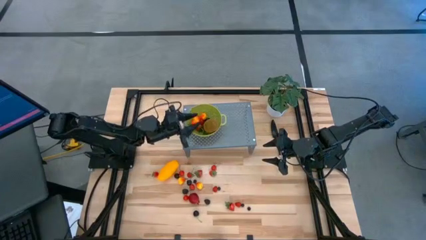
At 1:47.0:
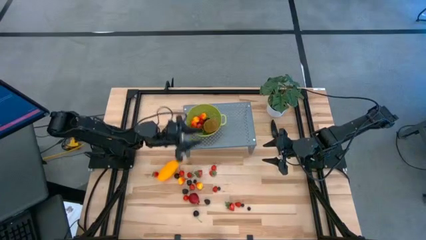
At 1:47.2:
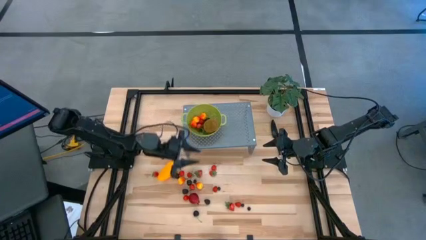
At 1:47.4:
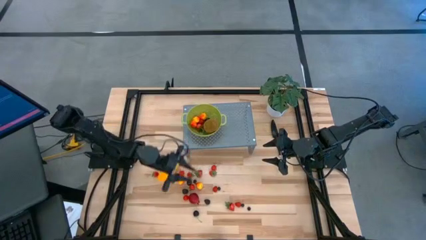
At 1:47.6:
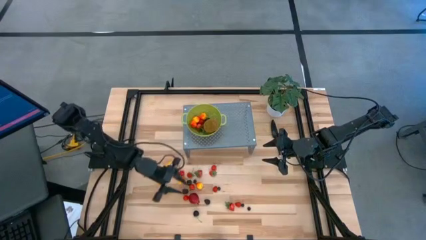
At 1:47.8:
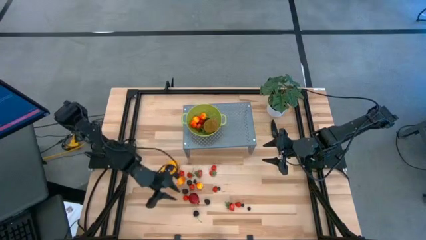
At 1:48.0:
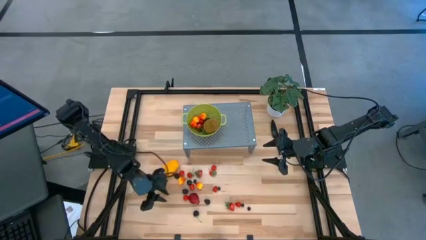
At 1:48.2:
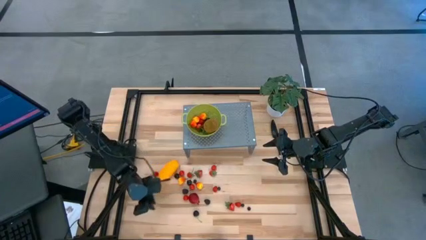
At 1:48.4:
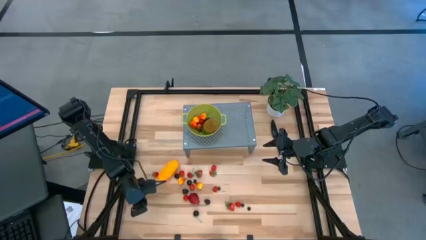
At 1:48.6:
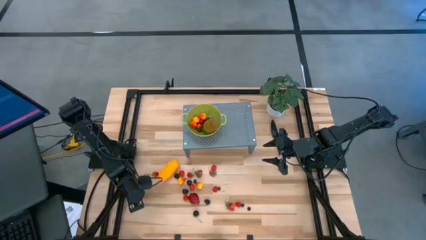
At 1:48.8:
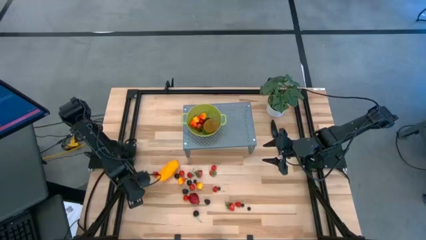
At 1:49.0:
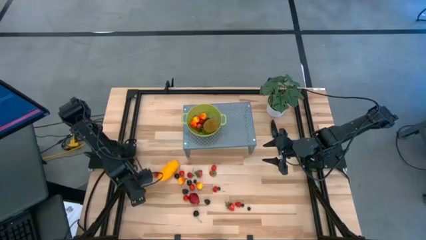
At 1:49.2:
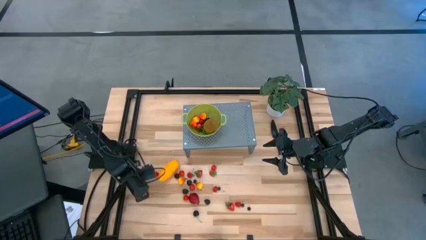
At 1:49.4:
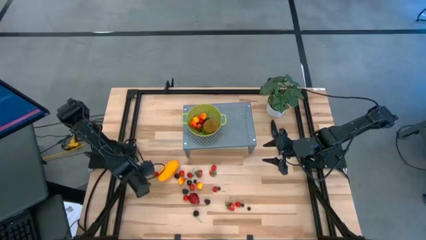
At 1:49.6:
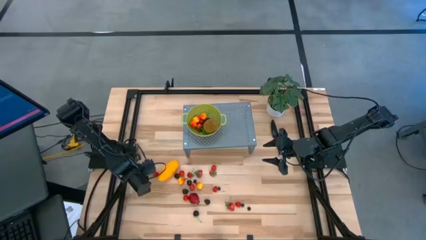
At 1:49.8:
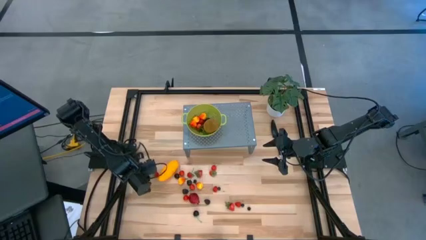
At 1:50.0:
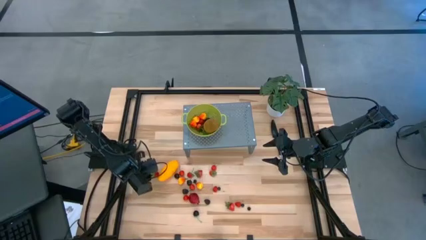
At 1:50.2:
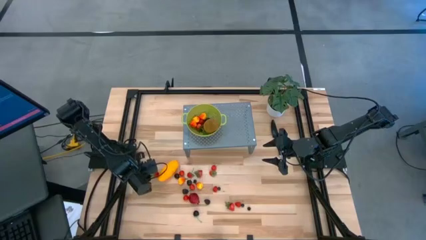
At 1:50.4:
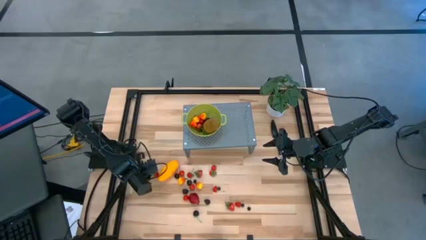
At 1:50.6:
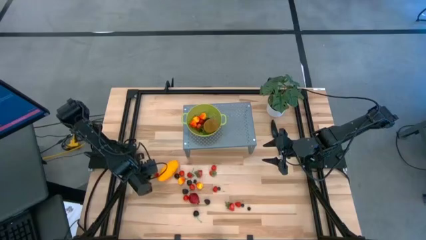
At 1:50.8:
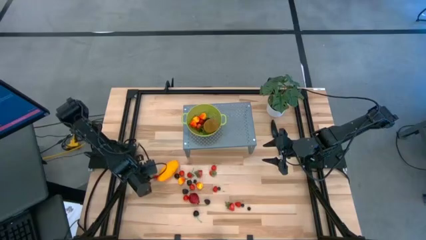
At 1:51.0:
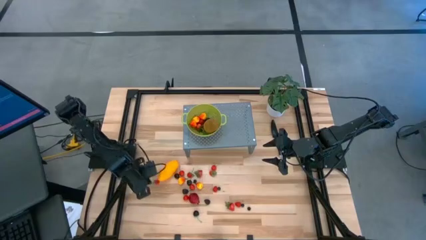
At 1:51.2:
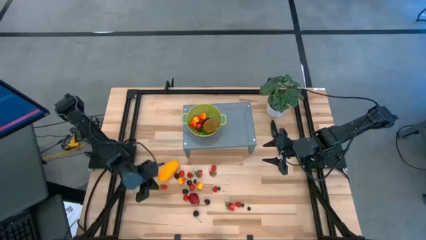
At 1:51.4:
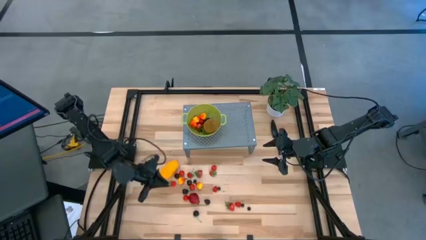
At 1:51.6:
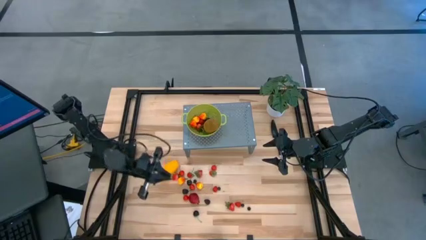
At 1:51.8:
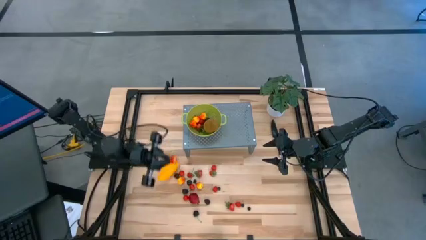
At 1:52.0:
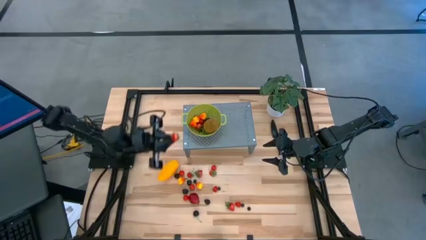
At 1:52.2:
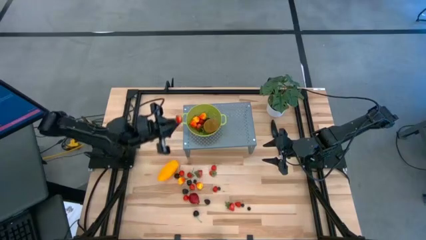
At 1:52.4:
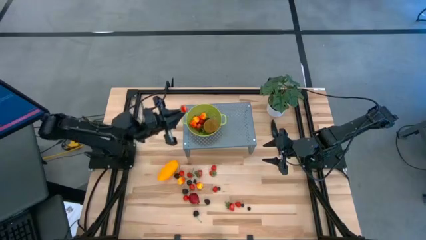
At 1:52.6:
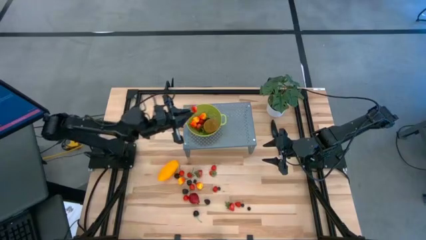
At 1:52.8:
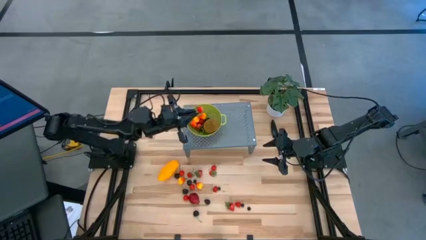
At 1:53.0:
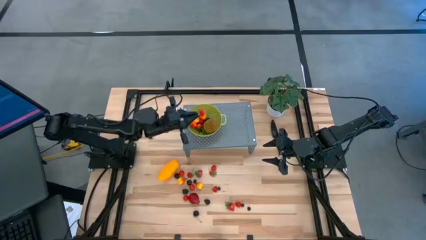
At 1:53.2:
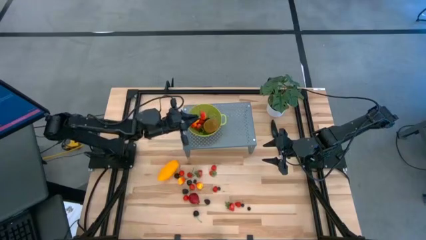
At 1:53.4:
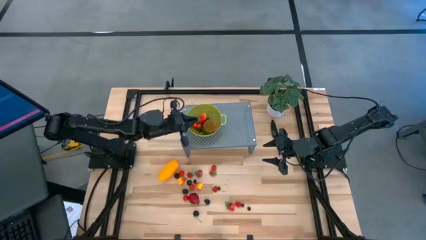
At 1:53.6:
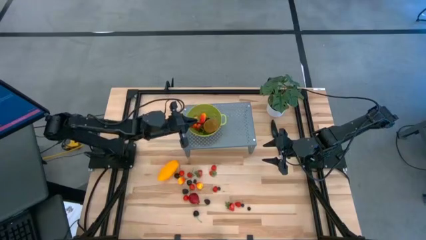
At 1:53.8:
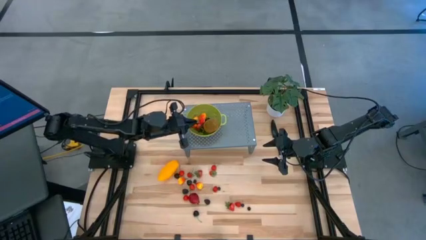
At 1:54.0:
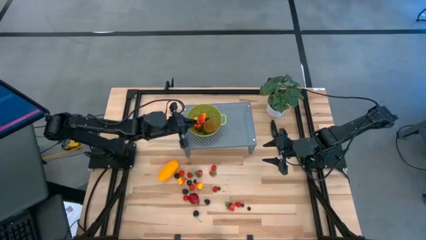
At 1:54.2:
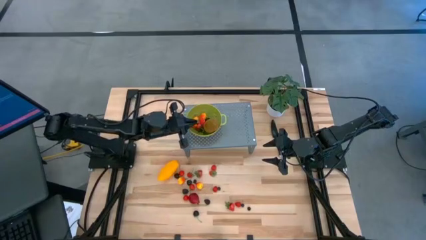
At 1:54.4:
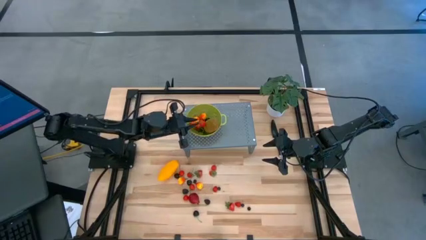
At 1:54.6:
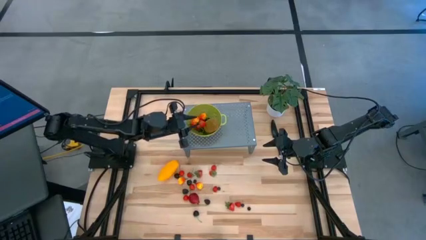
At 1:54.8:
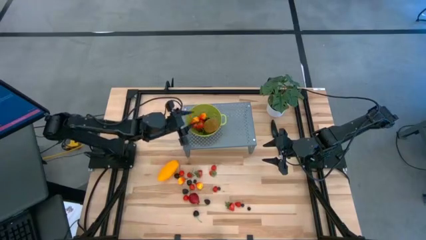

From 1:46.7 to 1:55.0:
Task: Pick & Place Fruit
Put the strawberry into the green strainer bowl on the shelf

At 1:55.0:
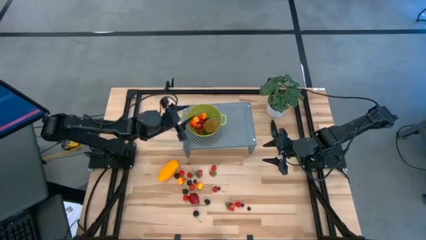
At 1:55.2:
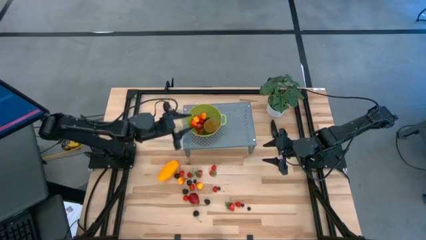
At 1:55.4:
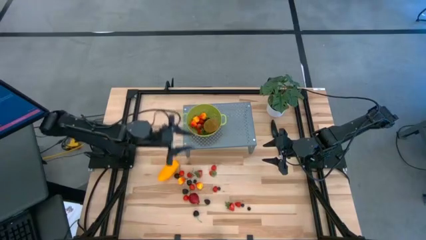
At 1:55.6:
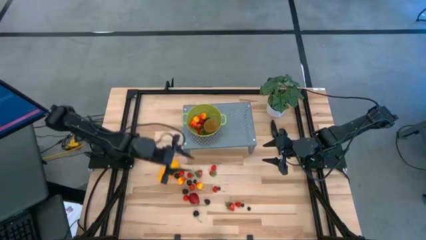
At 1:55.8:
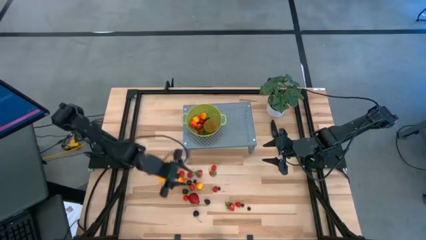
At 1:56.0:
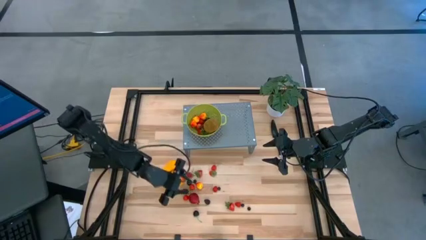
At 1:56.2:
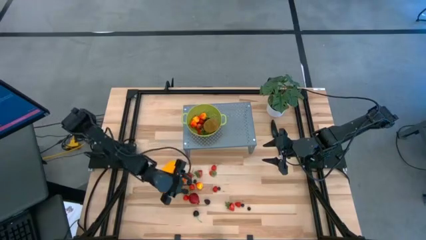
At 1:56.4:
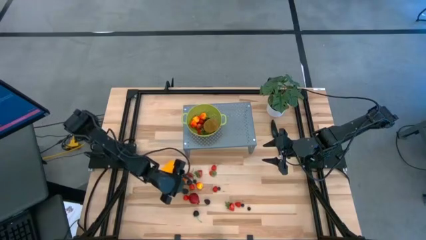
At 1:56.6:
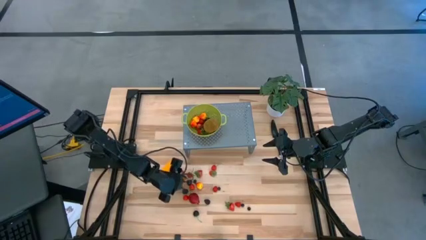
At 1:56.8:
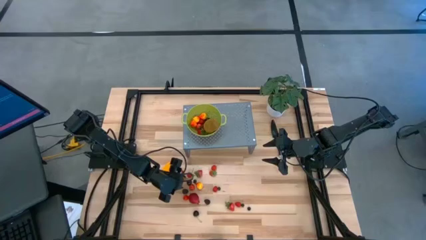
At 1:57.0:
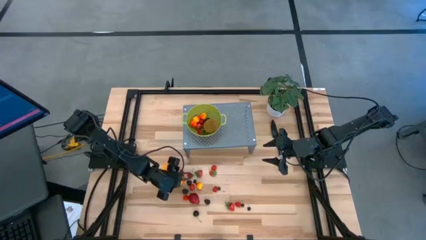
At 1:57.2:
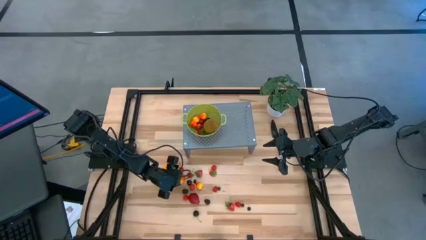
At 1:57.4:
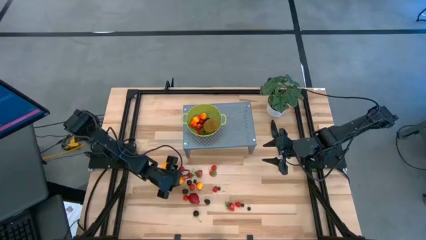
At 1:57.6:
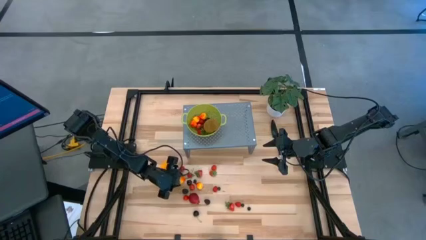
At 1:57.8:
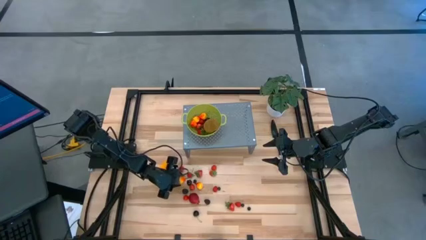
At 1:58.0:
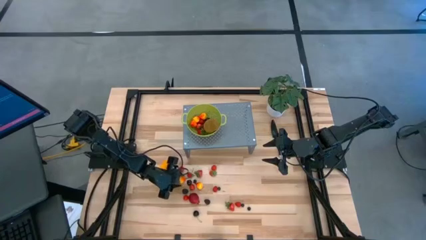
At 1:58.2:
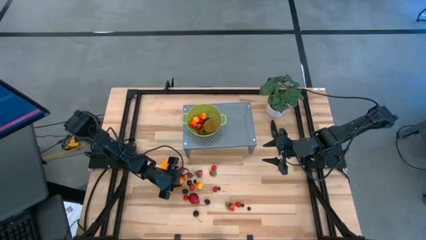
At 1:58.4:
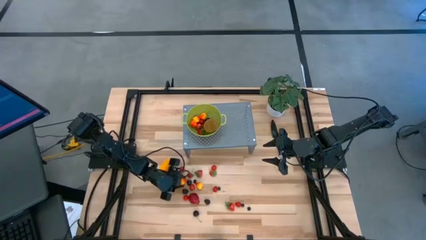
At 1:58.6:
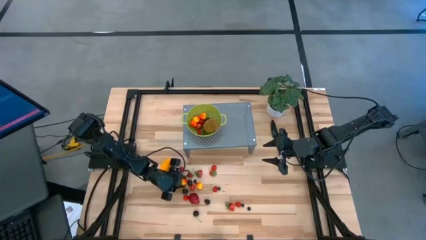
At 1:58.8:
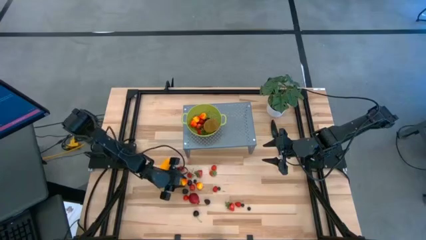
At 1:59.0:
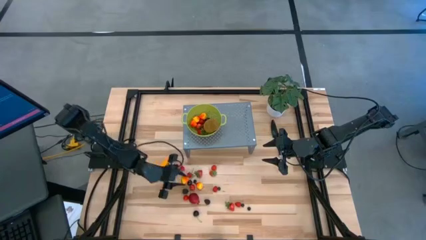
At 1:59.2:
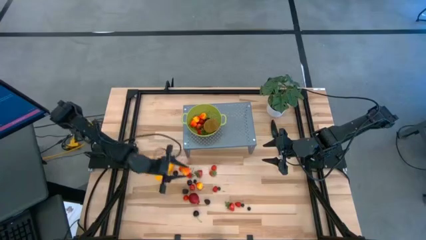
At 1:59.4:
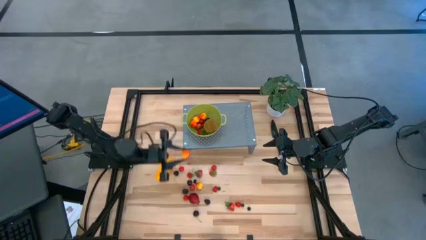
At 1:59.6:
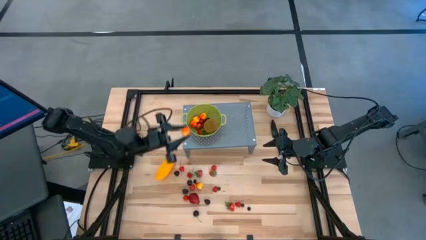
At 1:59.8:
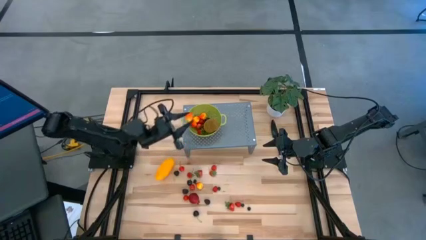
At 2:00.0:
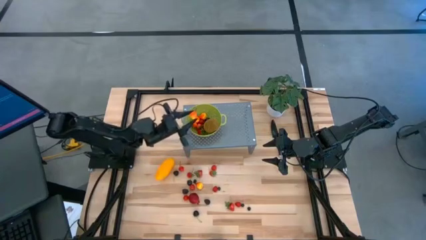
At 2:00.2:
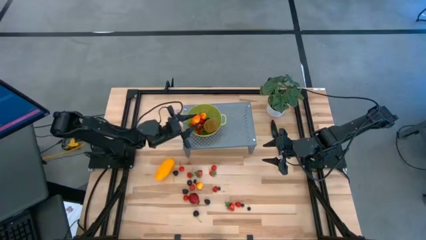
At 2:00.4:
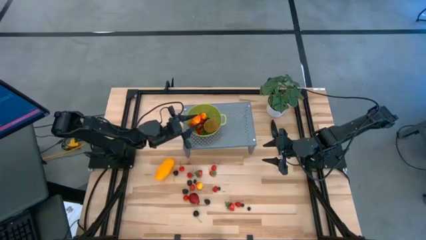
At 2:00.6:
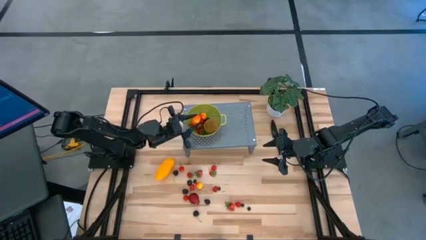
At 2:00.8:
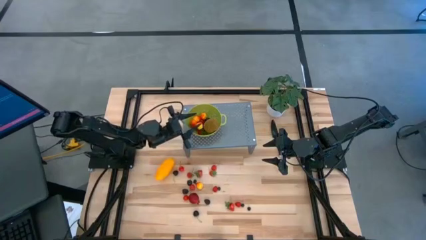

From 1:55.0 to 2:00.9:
Put the peach into the green strainer bowl on the shelf

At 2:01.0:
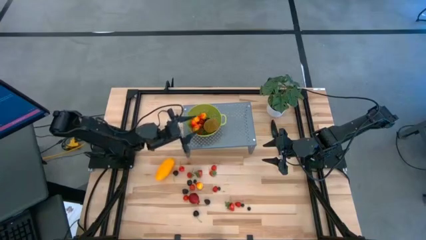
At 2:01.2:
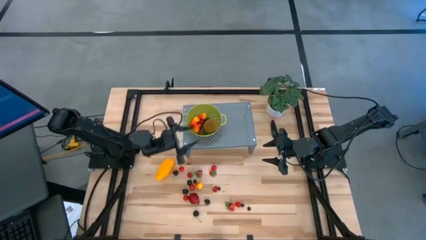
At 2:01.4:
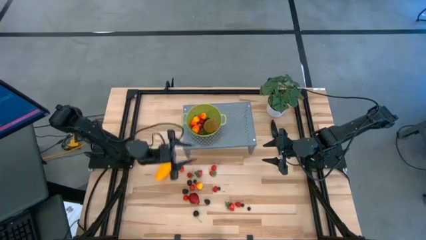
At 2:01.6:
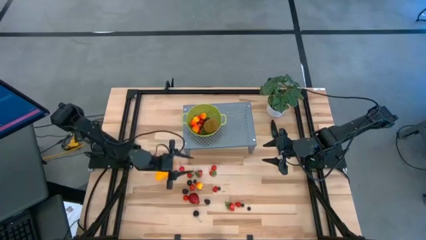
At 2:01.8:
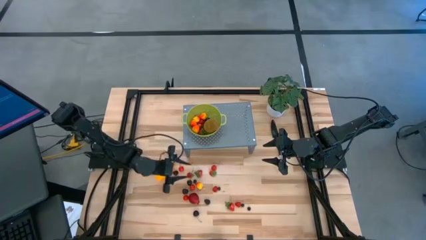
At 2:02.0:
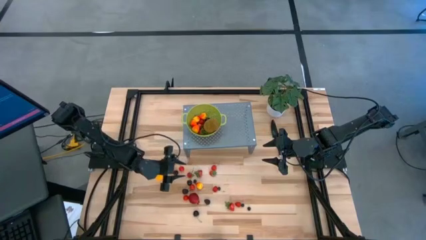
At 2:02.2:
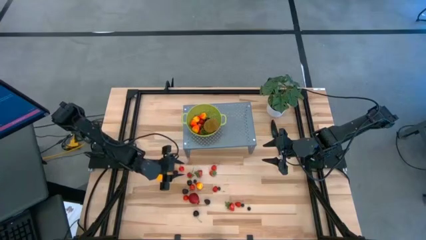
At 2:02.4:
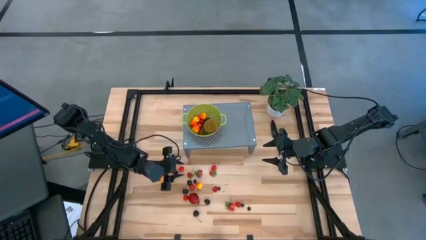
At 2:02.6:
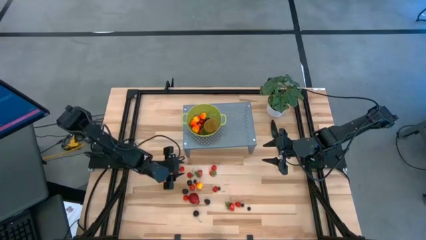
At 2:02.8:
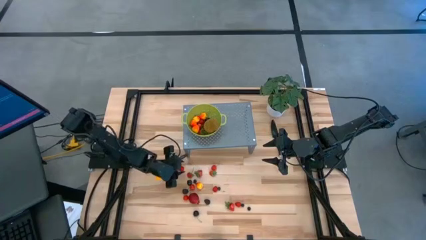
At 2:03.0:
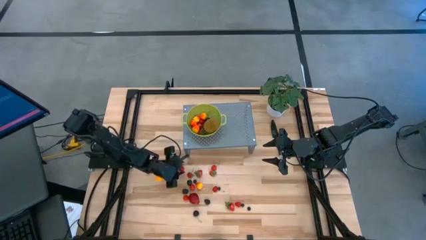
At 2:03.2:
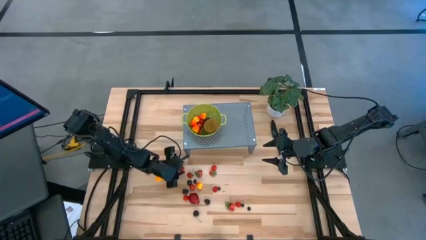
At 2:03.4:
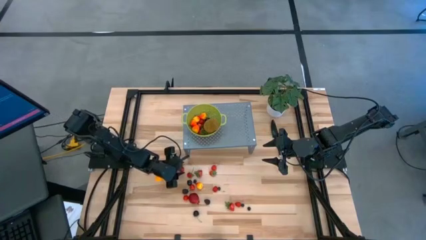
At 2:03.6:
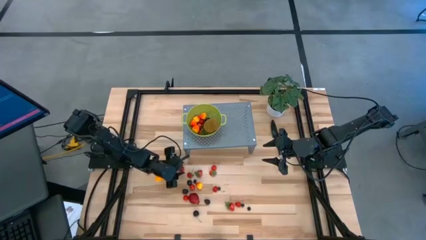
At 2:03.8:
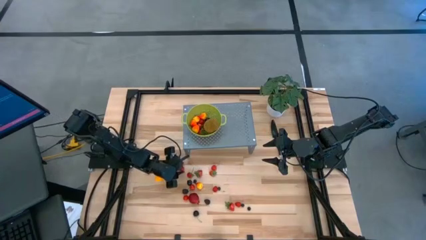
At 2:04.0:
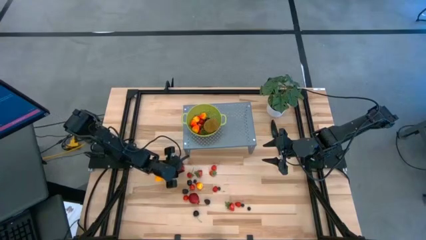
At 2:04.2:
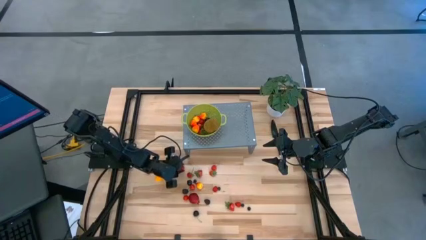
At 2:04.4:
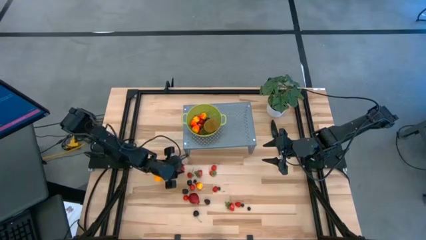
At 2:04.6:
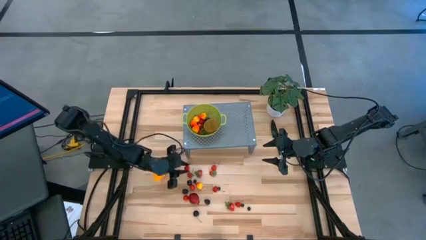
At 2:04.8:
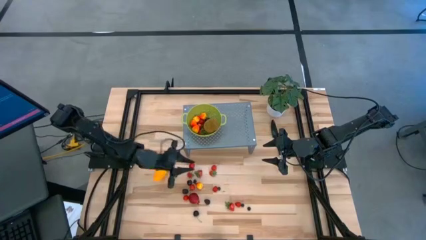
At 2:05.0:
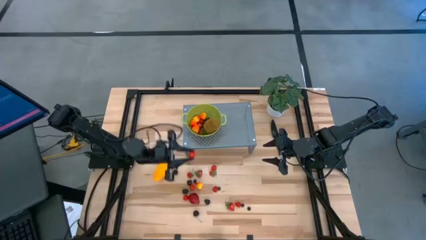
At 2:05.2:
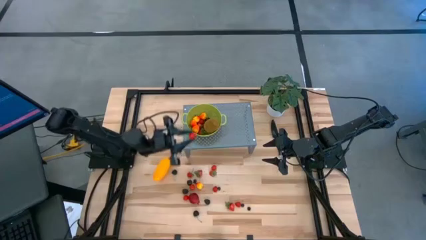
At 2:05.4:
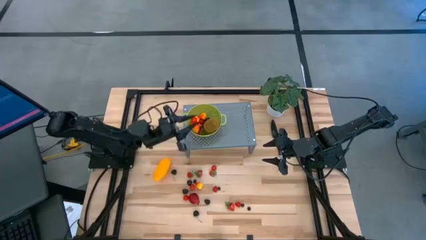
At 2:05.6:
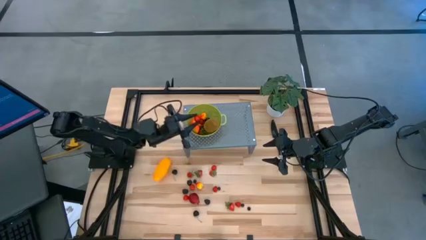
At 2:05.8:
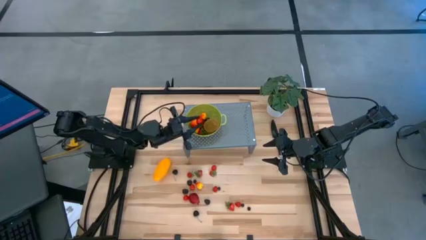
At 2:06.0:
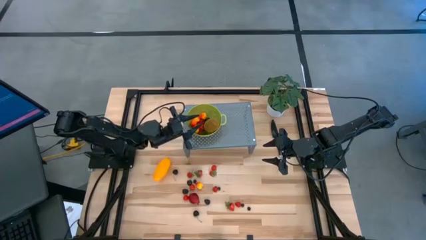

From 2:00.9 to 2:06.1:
Put the red cherry into the green strainer bowl on the shelf
